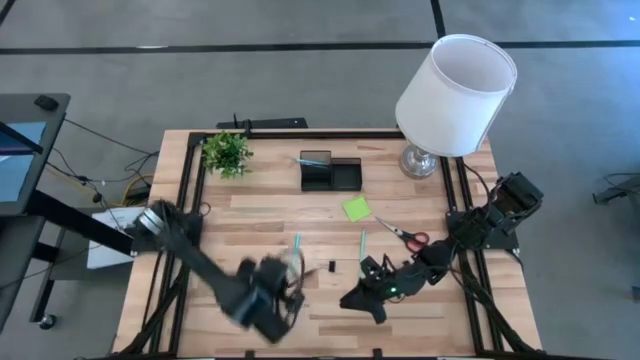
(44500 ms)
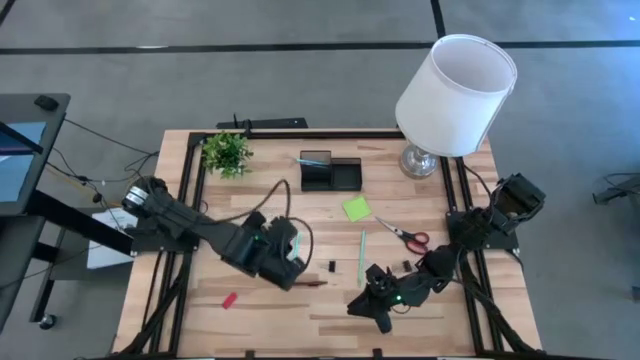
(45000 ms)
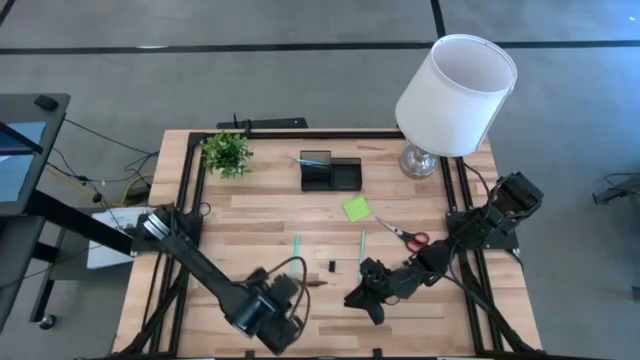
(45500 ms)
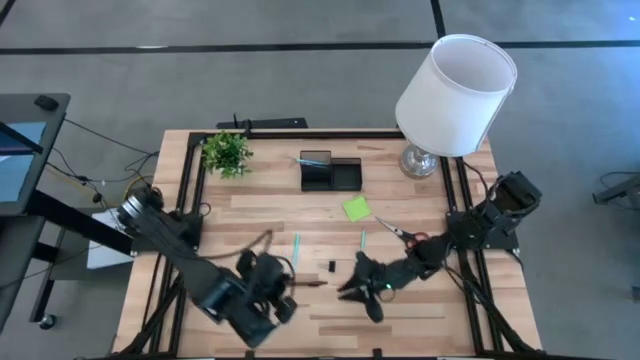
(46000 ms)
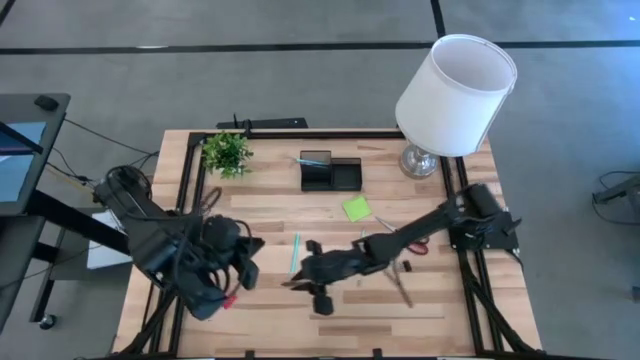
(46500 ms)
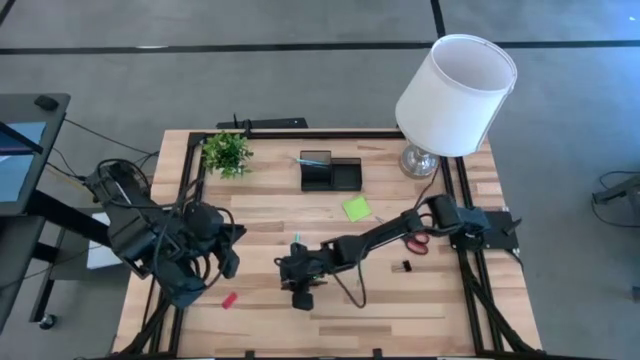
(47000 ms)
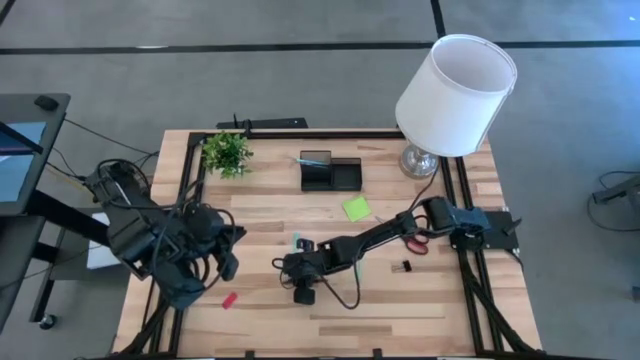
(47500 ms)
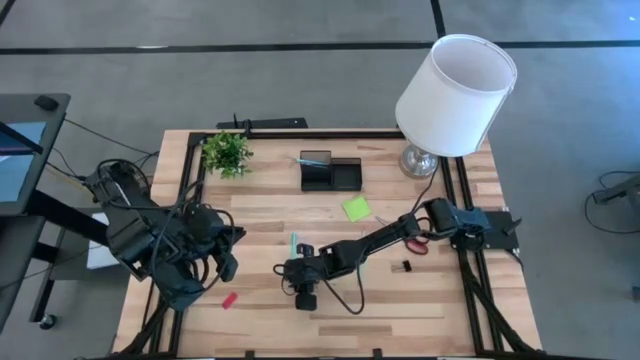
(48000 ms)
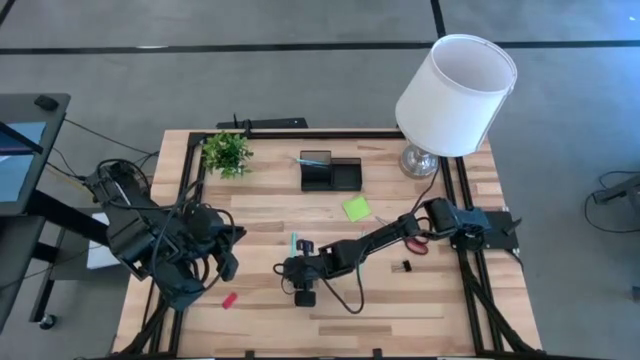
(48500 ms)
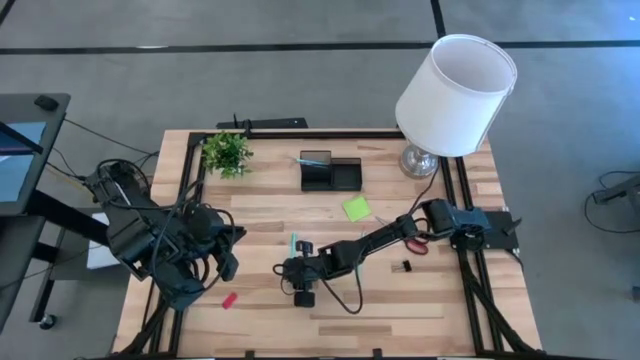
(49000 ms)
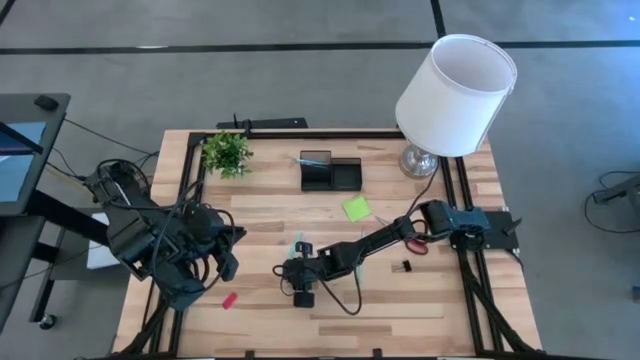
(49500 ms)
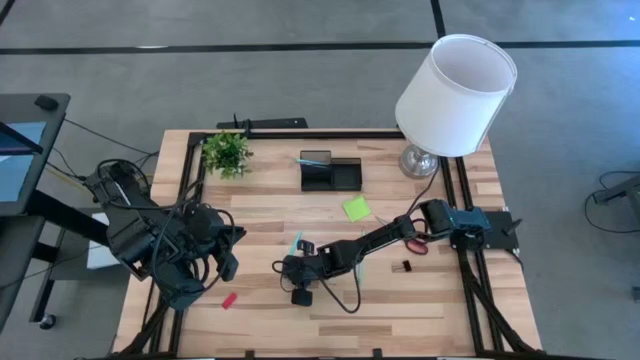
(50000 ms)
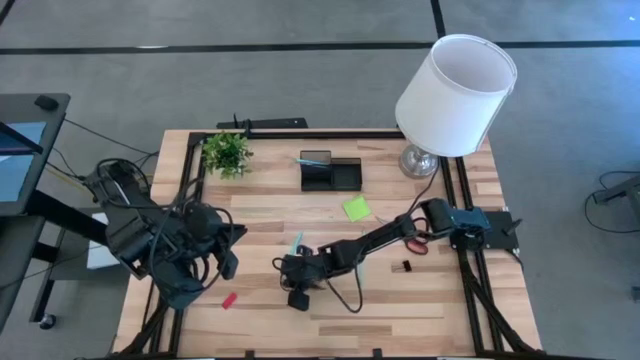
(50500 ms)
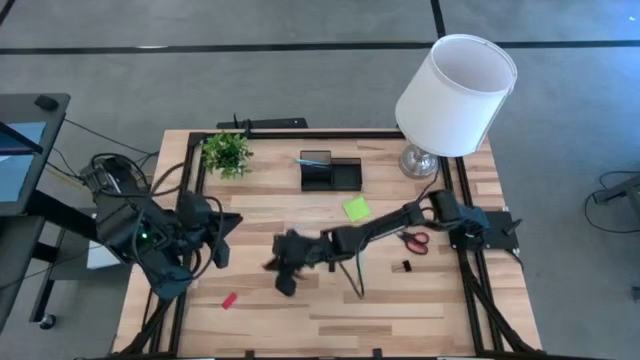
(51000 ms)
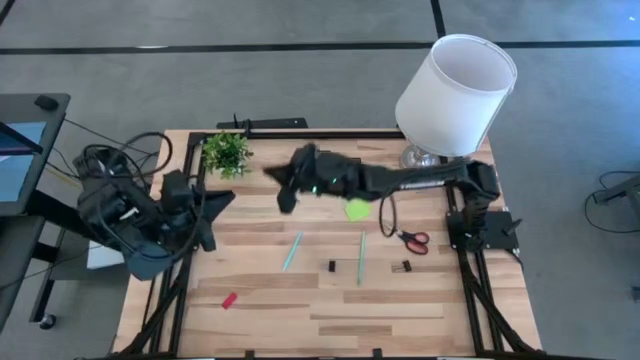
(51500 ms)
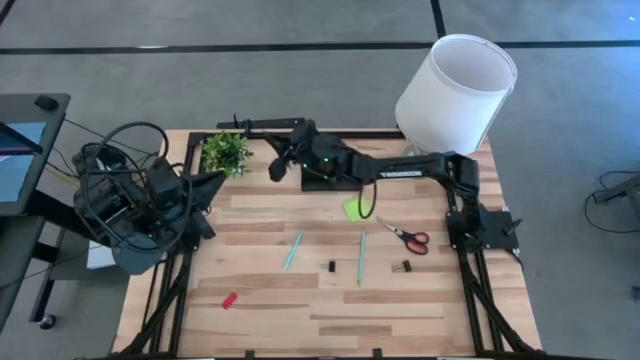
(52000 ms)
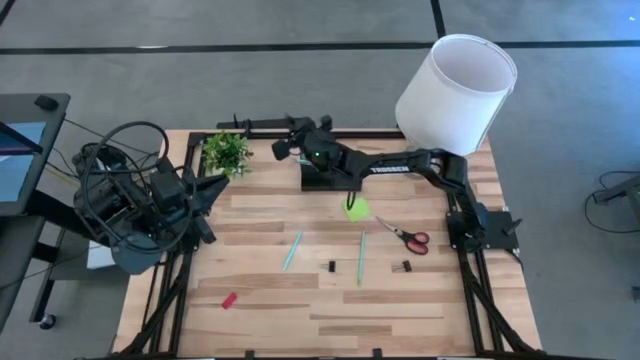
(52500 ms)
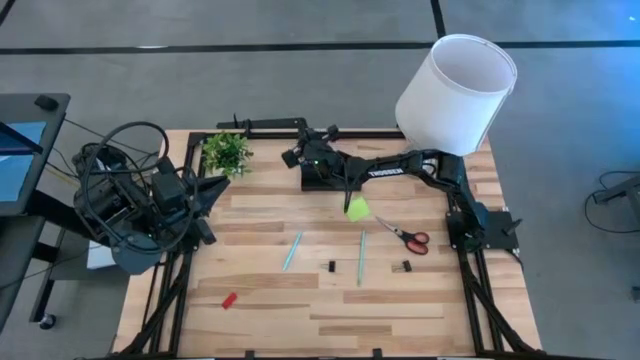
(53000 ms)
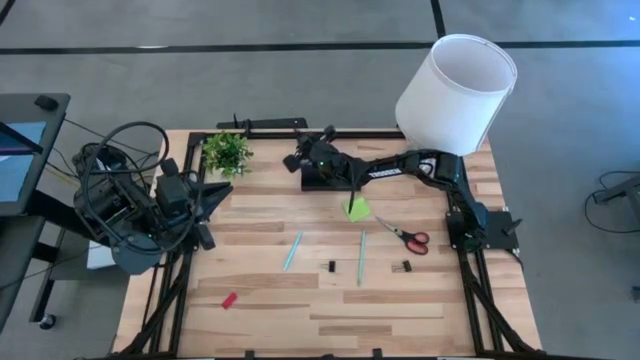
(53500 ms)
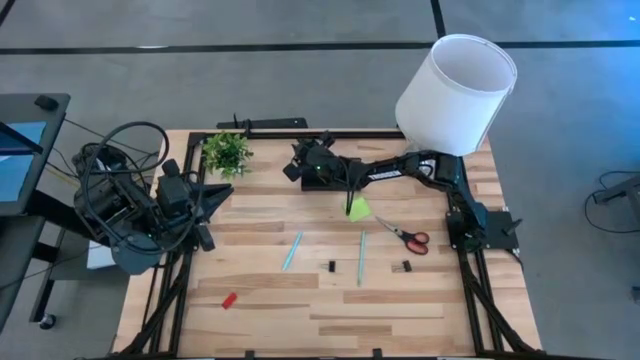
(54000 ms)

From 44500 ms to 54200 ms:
Task: Pick and place office supplies into organizer
Put the brown pen into the black desk organizer

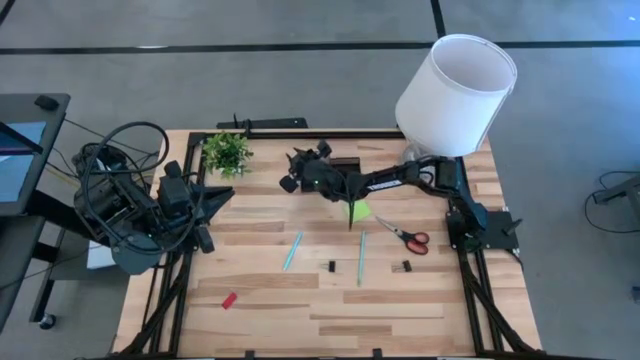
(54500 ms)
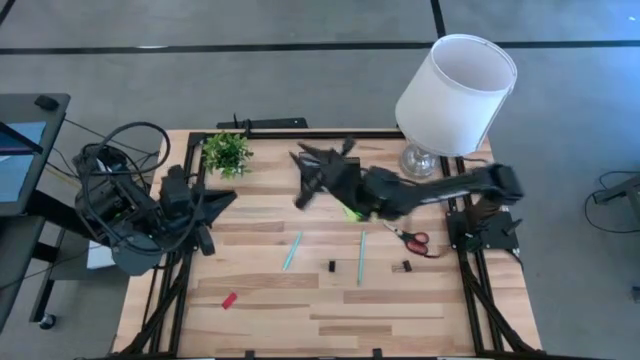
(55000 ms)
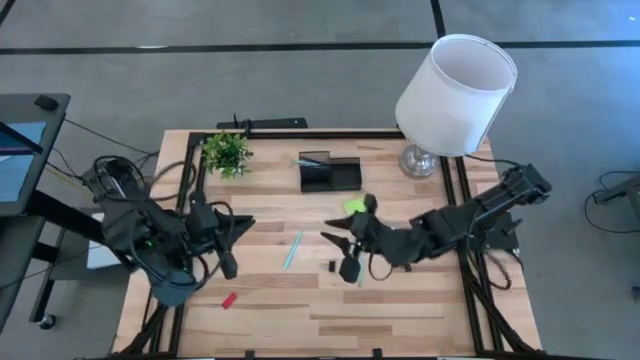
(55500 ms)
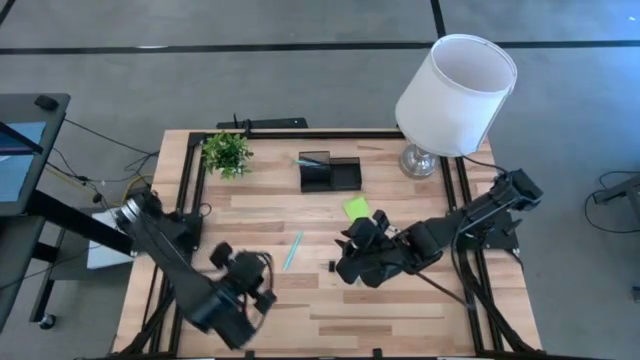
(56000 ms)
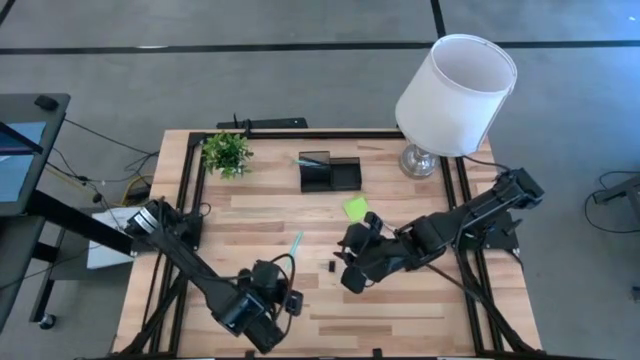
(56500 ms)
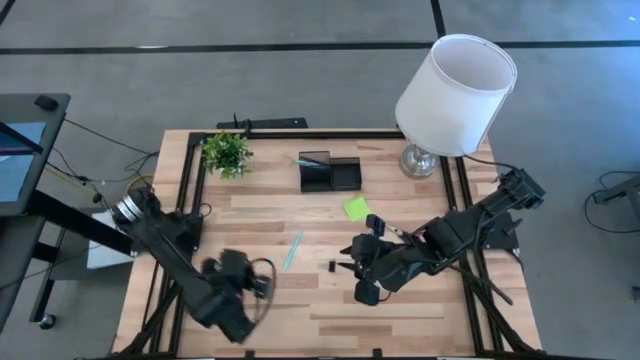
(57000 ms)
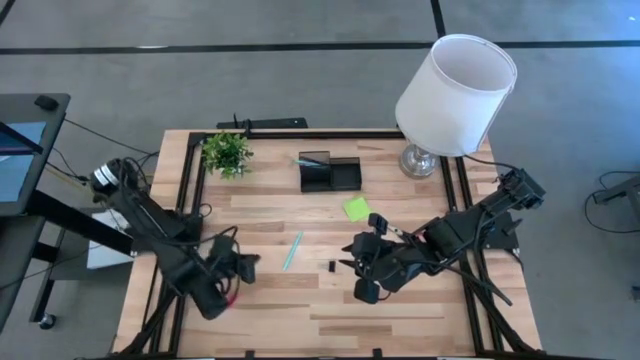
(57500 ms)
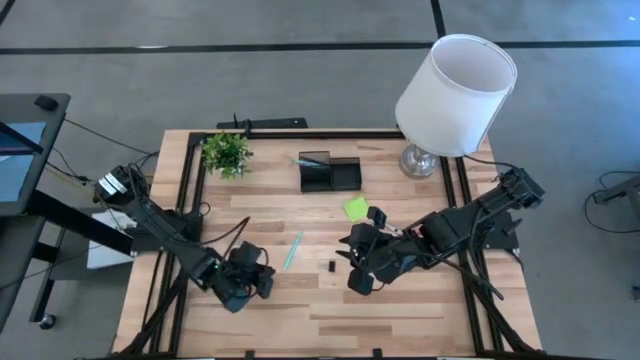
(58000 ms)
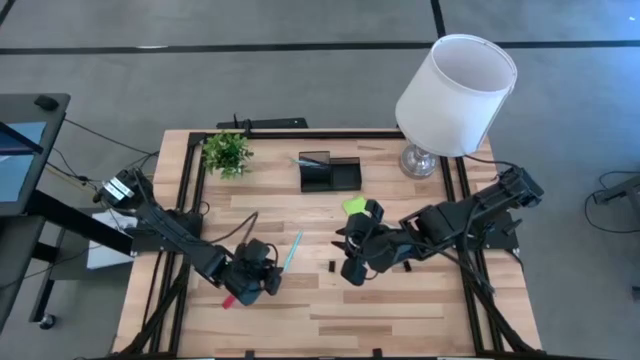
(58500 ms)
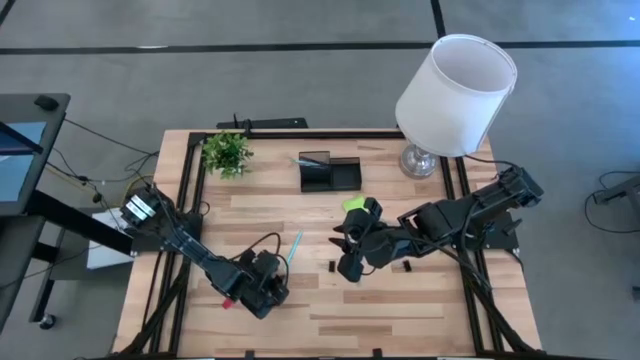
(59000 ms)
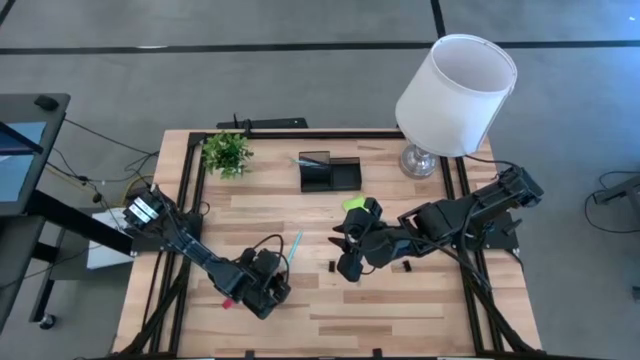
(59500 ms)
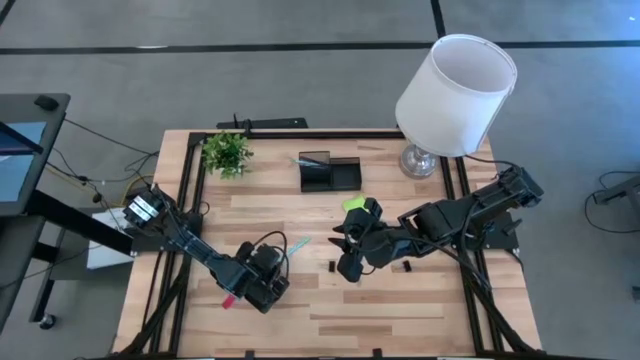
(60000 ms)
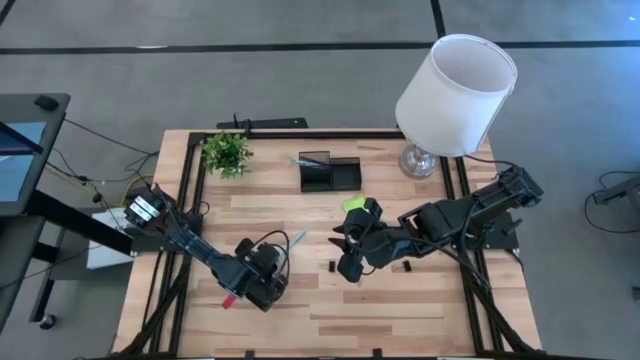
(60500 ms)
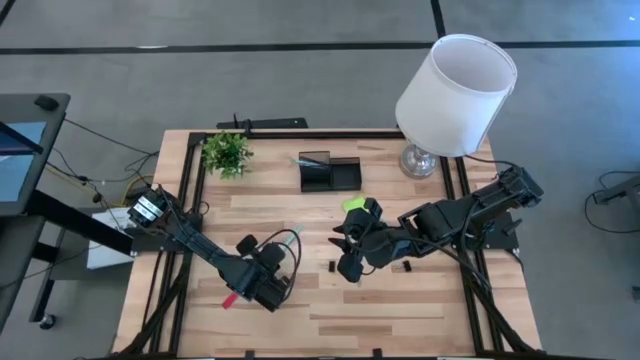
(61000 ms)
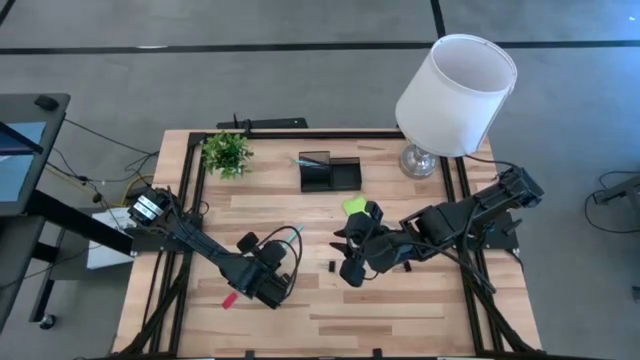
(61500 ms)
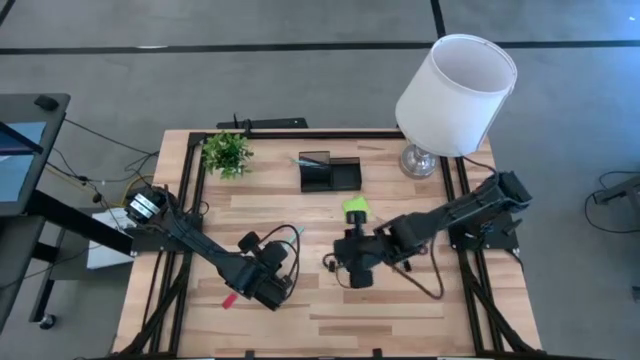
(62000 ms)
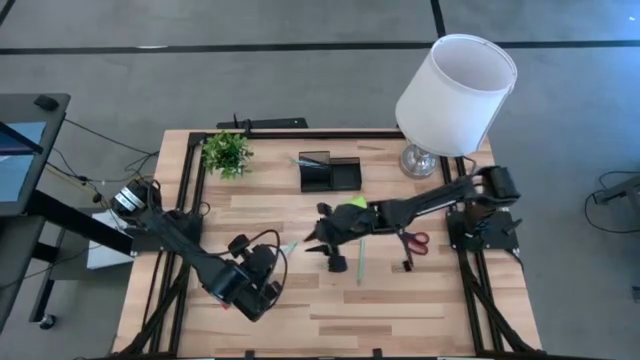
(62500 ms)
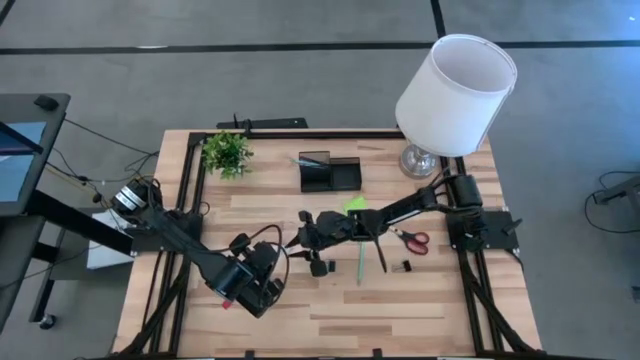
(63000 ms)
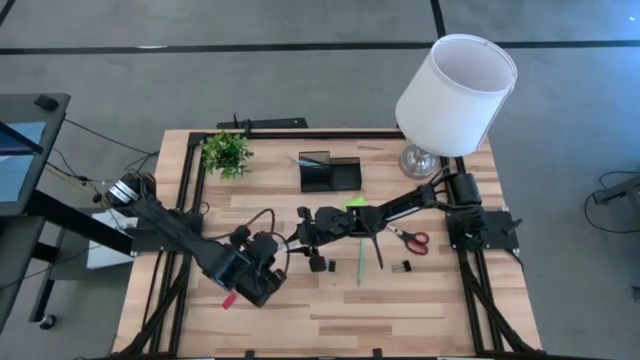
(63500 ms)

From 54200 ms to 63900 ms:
Put the blue pen into the black desk organizer

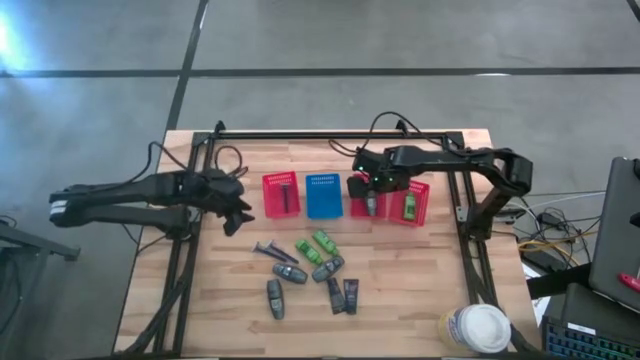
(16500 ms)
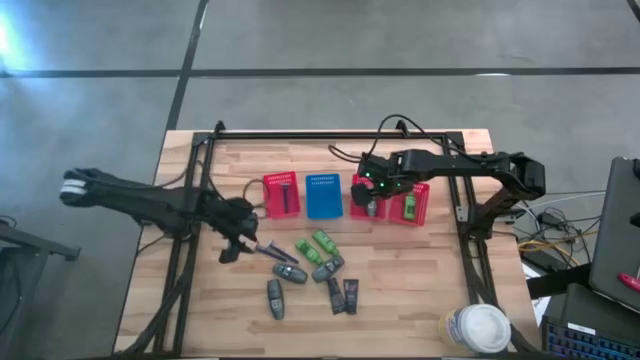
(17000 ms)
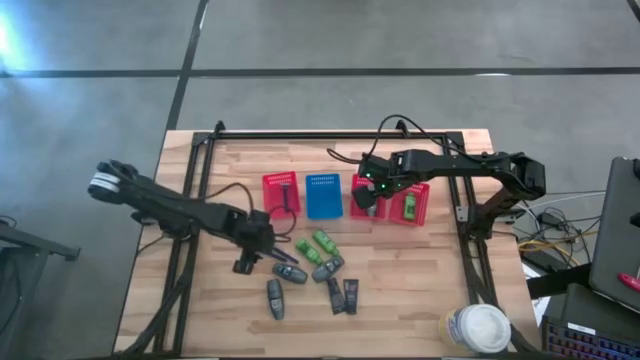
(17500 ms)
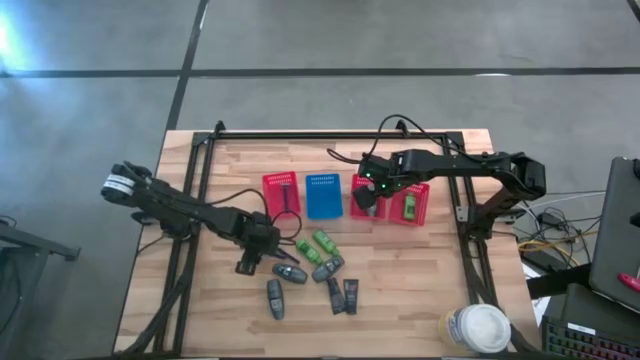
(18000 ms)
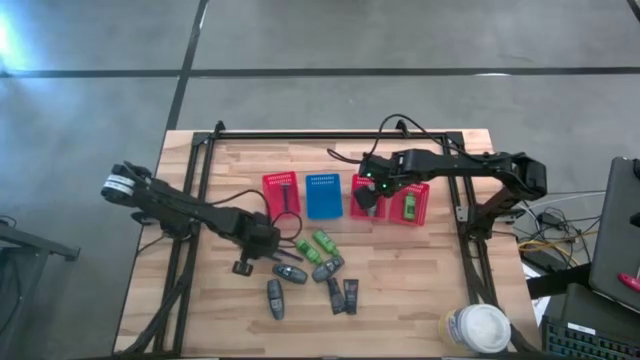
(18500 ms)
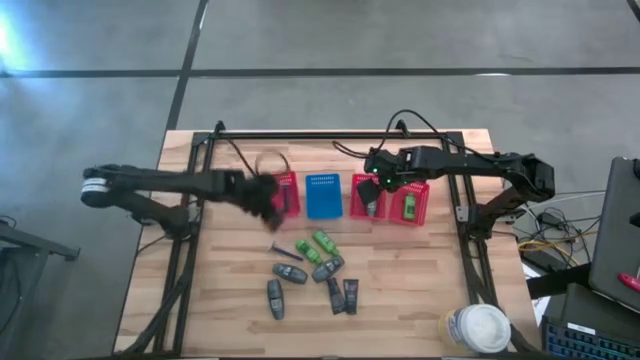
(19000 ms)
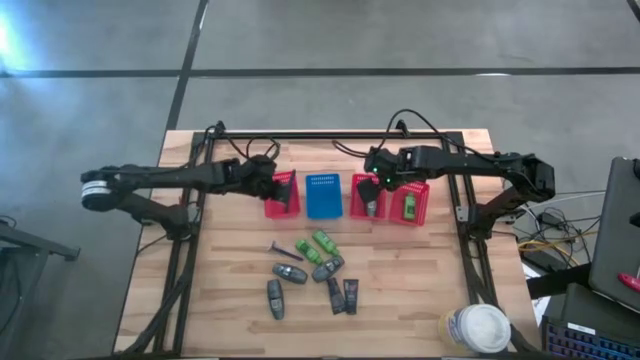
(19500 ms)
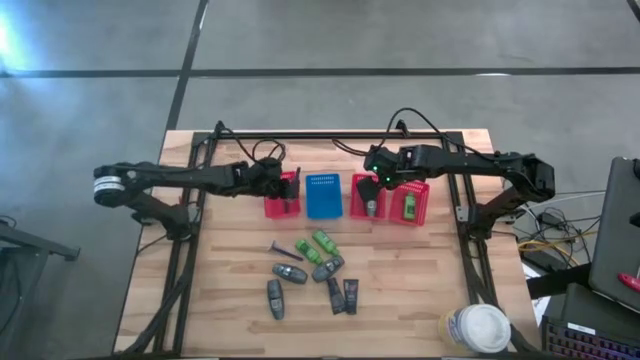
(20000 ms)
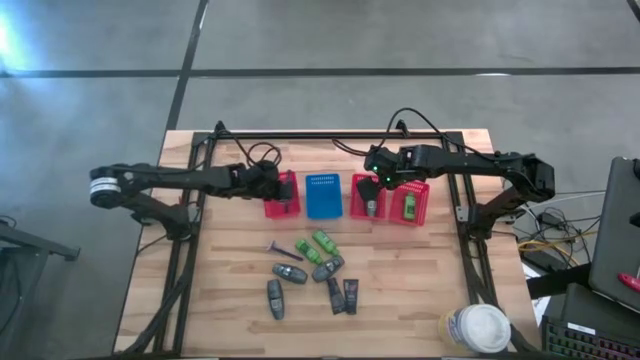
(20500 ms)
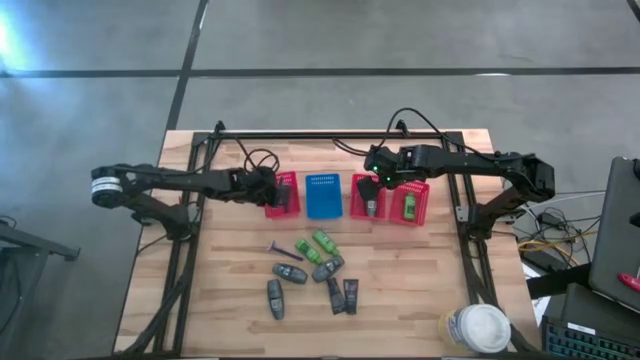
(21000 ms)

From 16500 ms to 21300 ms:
Task: Pick & Place Travel size toiletries
Put the blue razor into the left red bin
